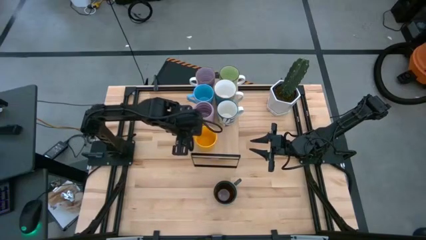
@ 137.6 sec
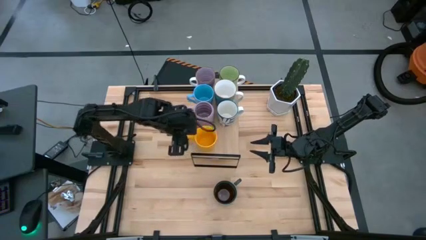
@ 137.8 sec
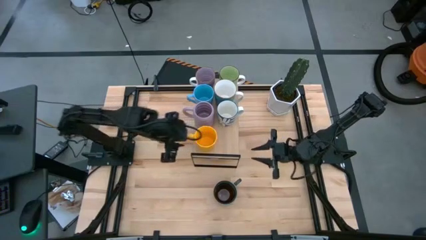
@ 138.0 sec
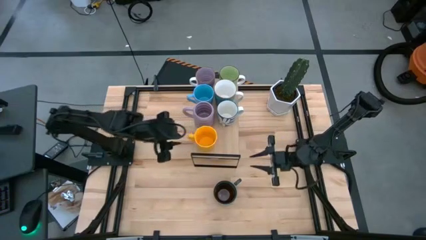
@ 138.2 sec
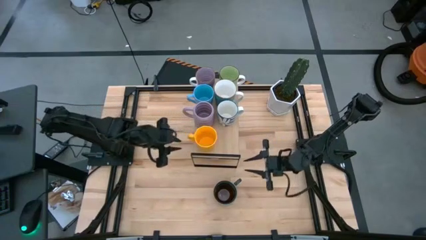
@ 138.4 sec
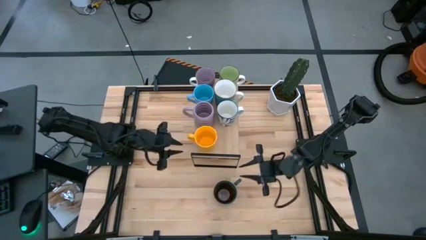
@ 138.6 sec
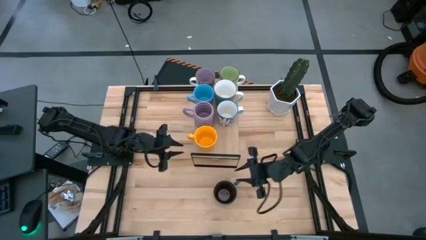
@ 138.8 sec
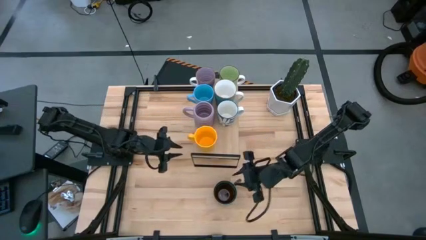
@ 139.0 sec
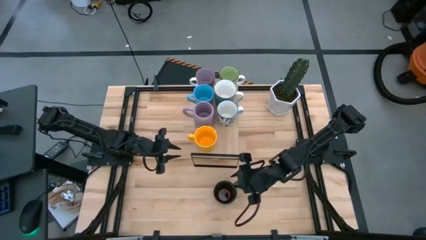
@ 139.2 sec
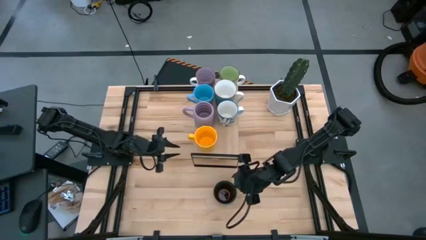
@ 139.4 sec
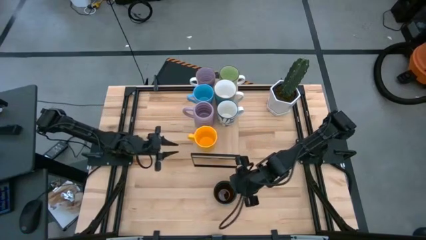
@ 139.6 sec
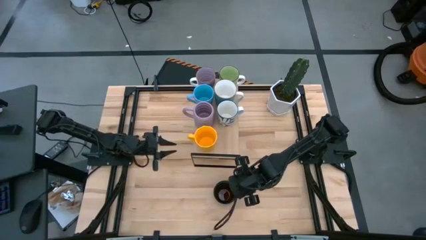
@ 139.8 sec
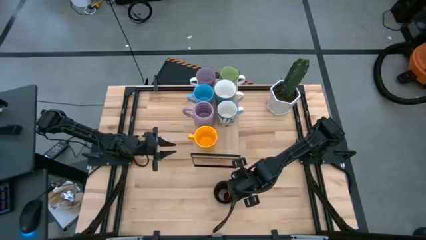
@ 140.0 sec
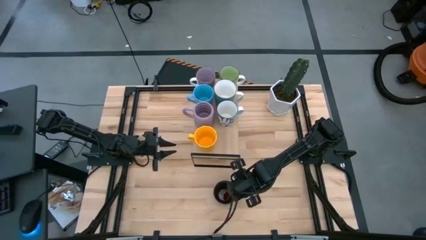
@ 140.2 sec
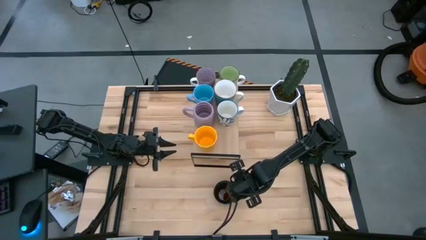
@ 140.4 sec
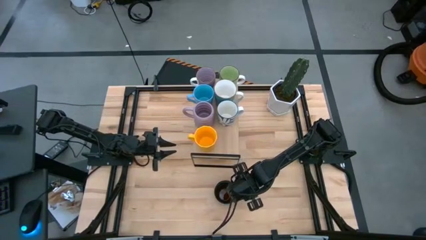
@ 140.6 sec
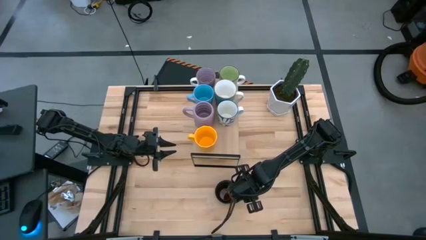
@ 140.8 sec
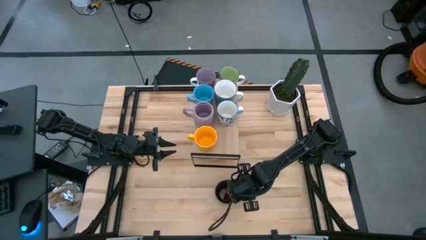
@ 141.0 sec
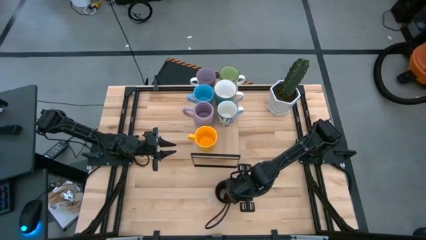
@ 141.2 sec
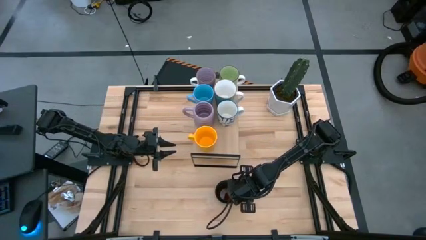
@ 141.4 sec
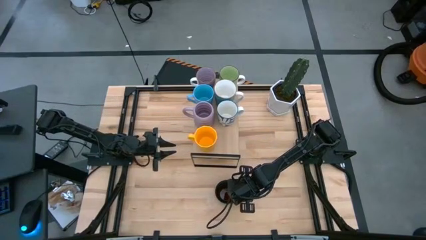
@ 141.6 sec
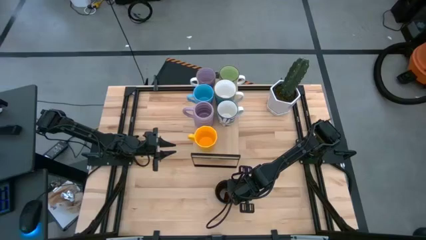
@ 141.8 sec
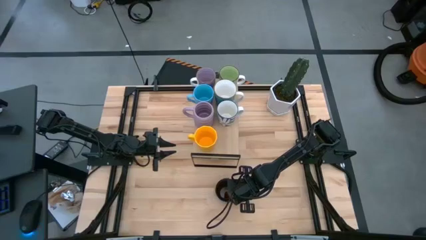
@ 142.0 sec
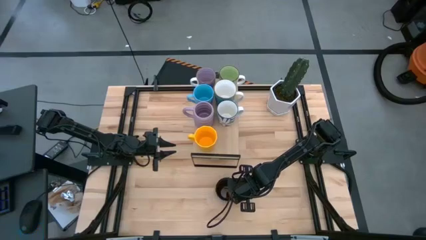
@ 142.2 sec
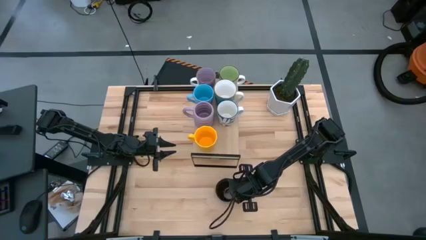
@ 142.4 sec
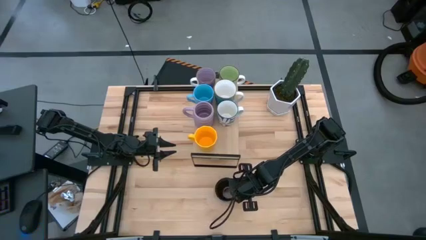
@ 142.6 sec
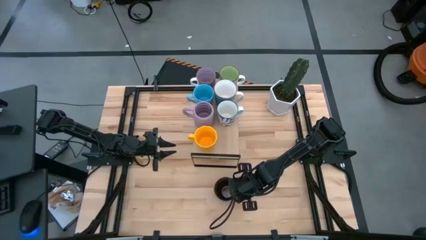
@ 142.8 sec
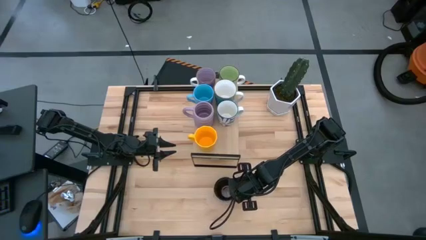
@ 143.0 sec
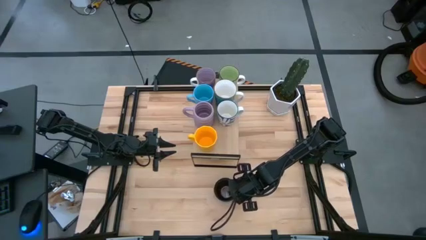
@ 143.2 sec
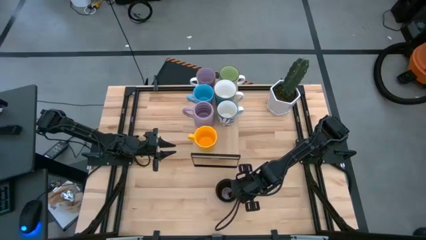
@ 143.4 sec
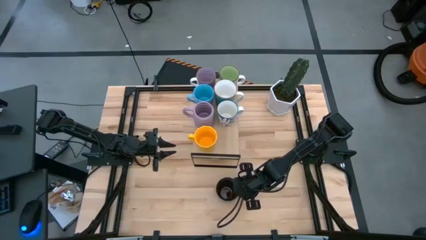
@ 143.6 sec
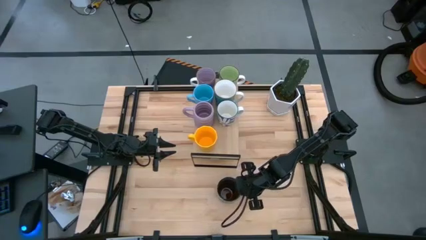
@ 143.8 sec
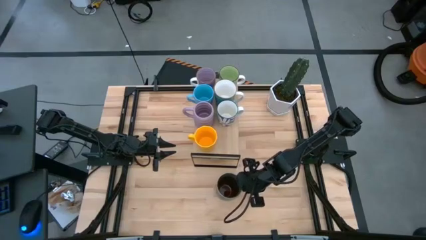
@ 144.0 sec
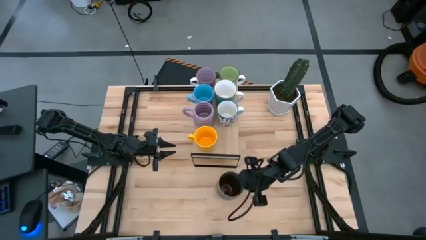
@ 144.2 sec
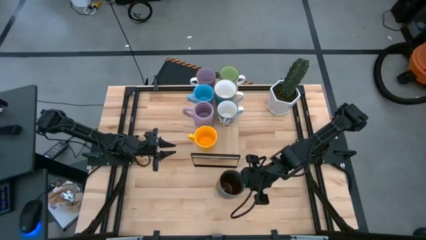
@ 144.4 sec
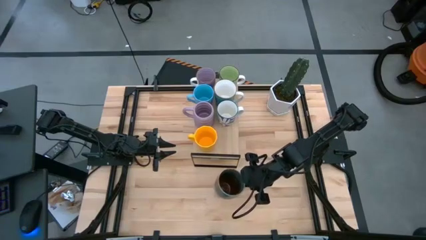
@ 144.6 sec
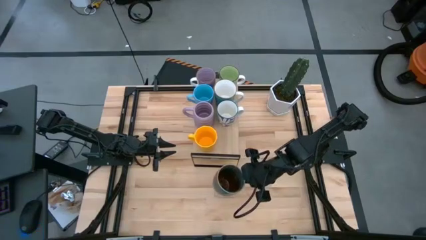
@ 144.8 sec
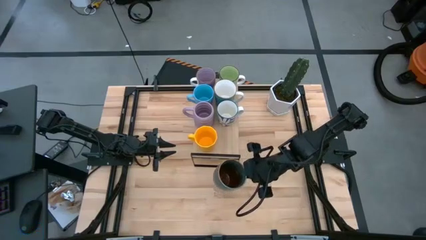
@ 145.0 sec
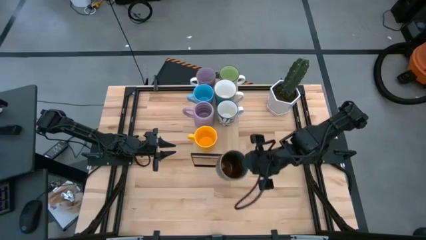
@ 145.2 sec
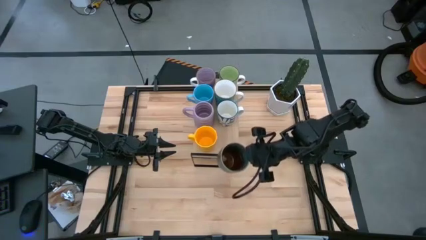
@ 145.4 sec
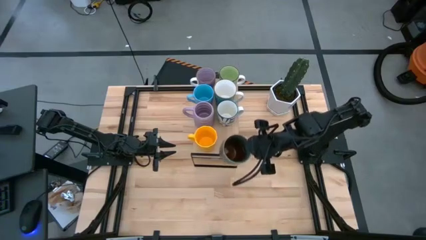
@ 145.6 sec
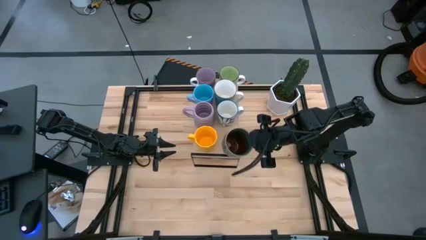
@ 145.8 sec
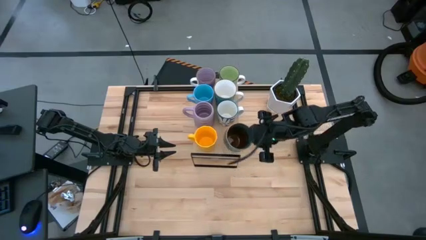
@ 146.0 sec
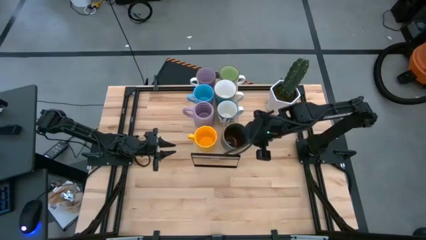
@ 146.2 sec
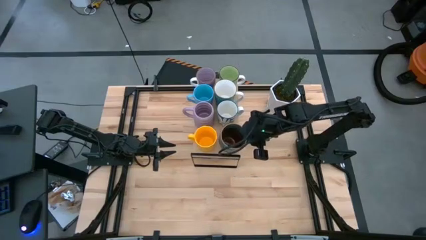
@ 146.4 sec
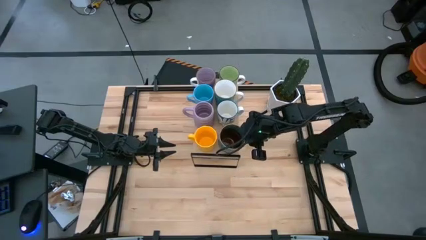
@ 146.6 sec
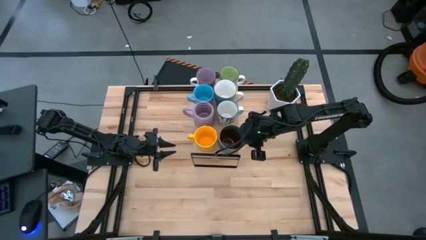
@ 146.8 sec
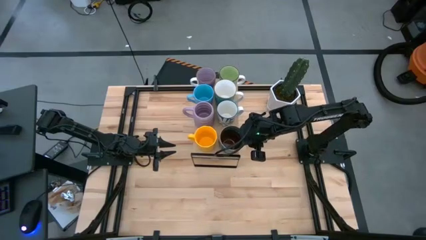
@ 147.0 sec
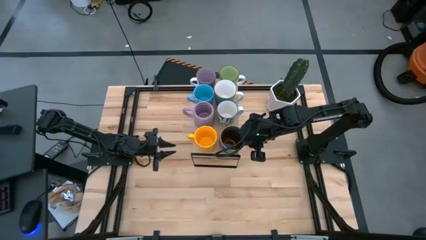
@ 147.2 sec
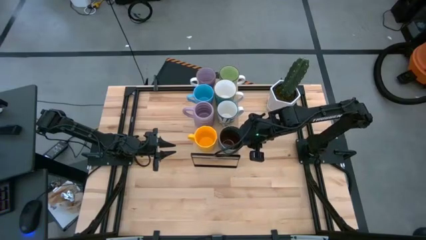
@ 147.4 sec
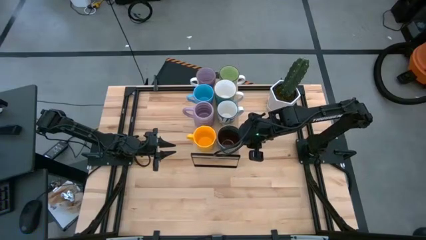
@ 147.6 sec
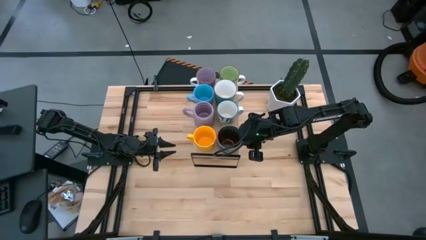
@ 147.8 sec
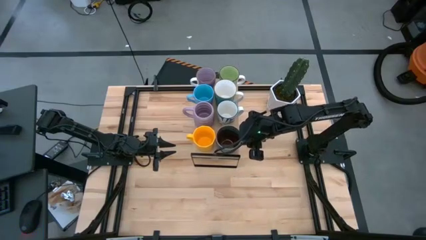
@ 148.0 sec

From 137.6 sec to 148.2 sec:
Task: Place coffee mugs
Put the dark green mug on the shelf

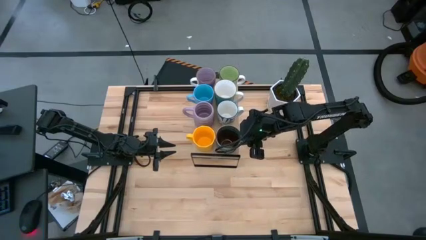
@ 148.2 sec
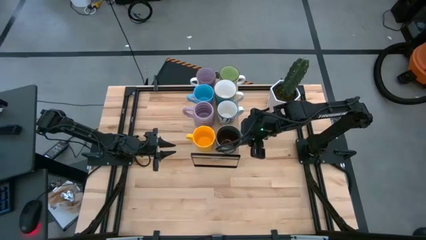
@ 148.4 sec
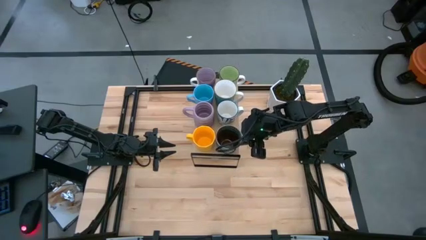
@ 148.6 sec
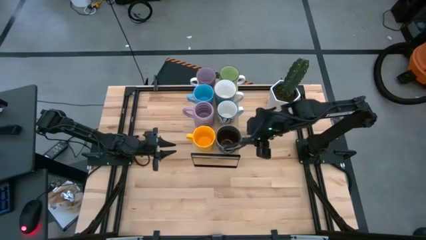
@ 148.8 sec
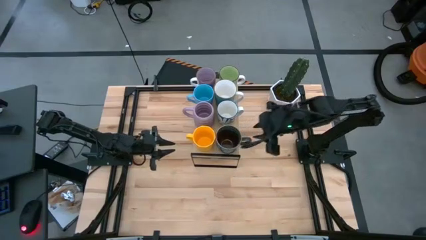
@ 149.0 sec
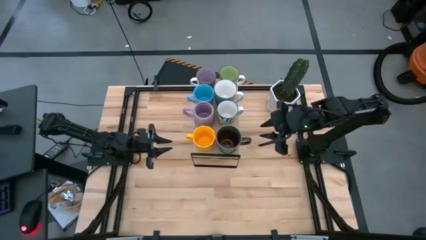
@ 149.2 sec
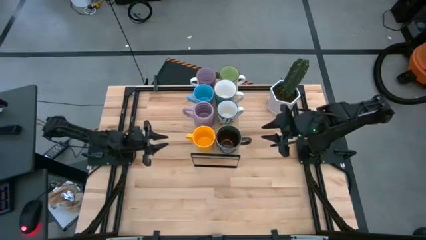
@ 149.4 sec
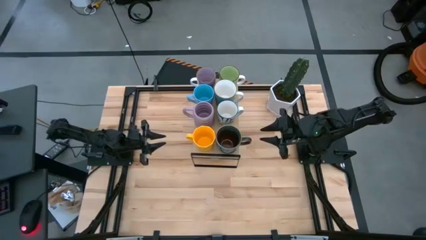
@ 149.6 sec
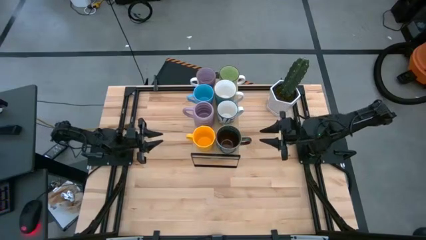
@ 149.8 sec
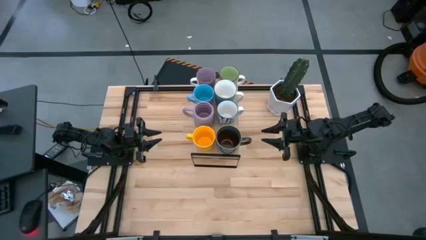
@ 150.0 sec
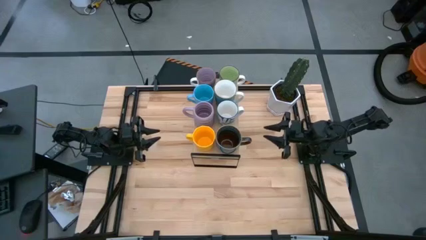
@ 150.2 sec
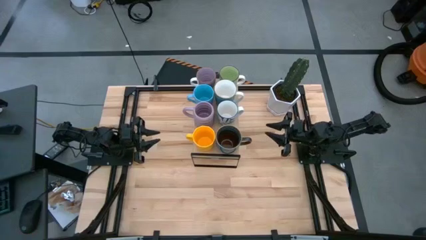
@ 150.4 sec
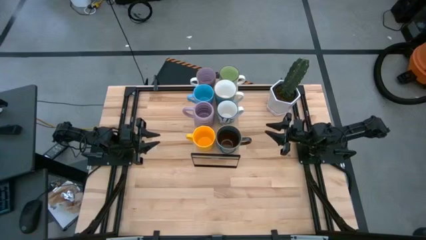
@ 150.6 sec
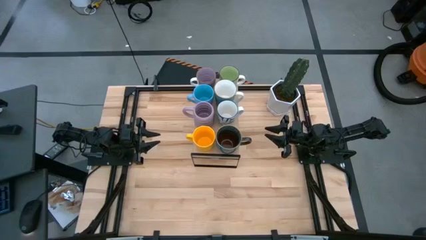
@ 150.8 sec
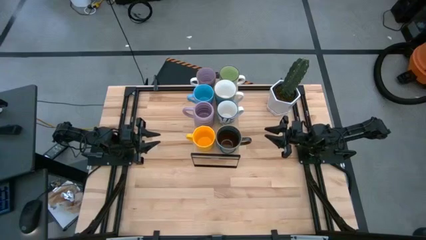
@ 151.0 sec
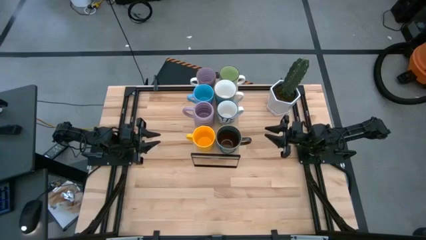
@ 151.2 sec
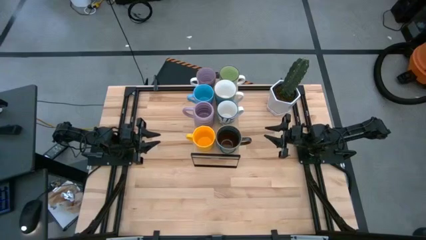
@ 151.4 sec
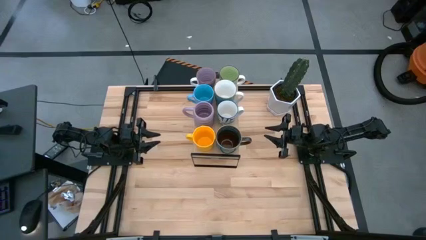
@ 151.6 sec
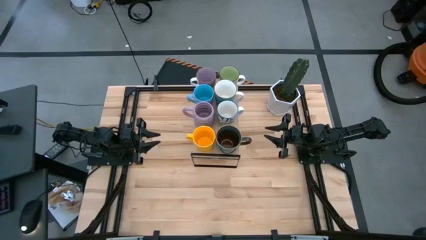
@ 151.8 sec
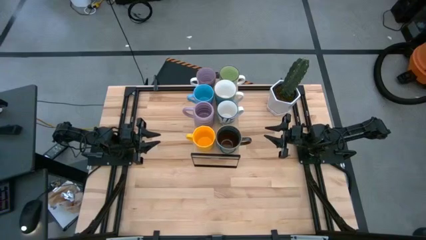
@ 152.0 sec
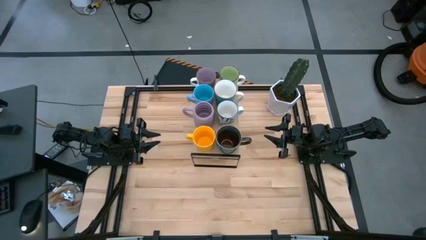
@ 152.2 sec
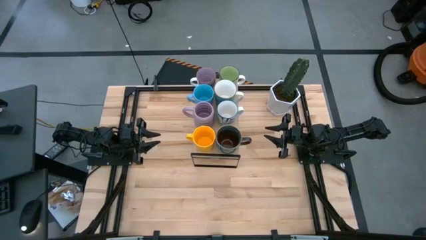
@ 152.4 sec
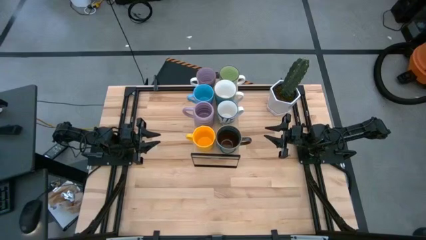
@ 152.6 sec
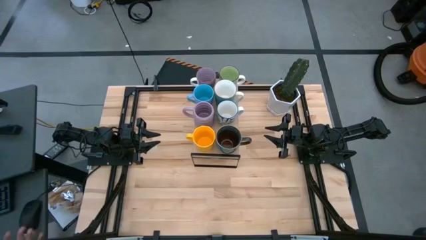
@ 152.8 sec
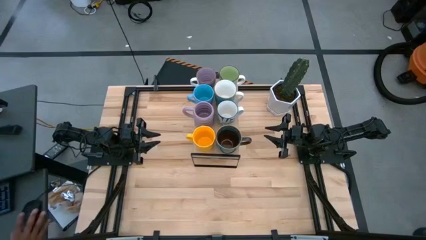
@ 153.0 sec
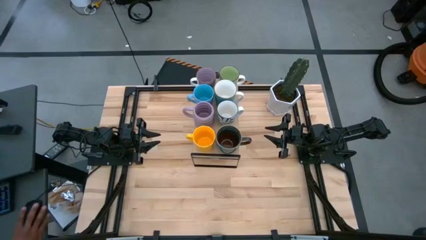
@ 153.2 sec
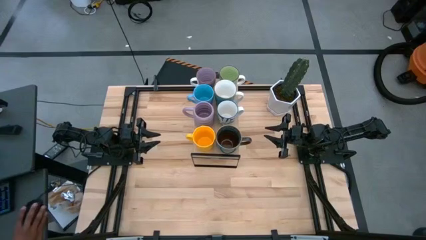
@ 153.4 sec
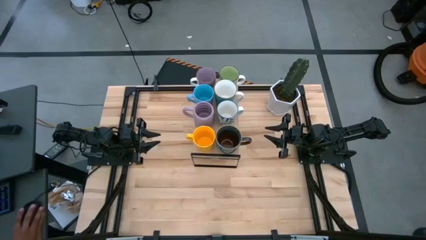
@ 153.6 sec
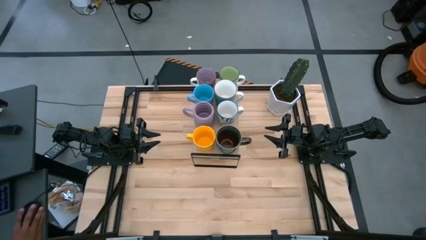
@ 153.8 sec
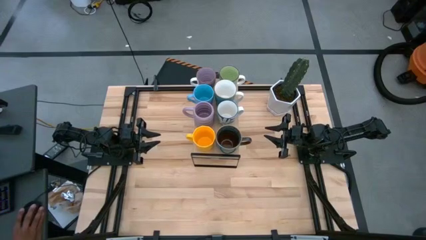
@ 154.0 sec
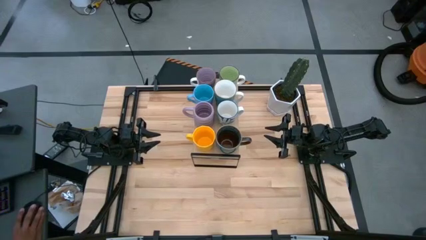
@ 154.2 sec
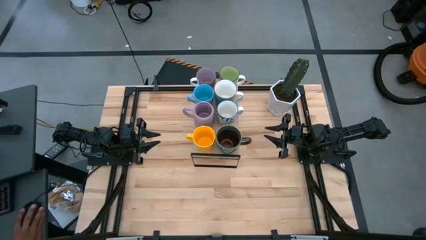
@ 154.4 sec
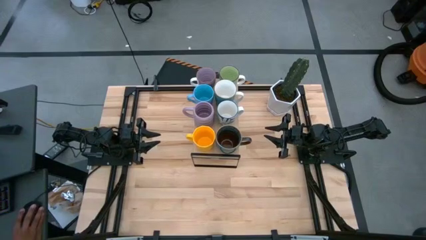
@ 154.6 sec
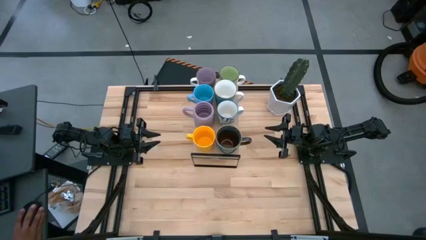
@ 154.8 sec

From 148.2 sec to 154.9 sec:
Return to Home Position
